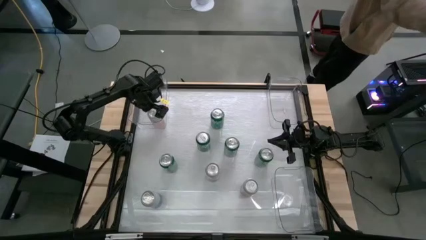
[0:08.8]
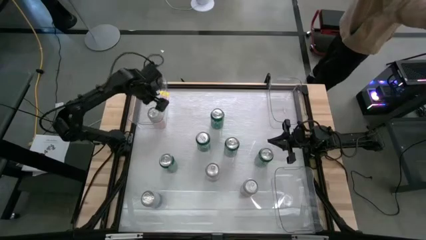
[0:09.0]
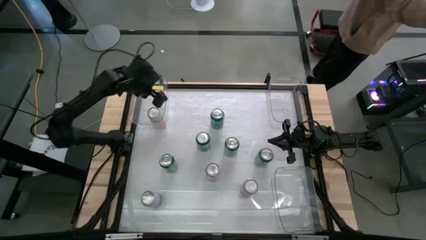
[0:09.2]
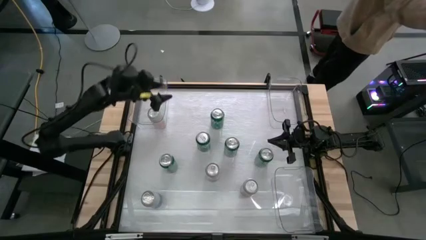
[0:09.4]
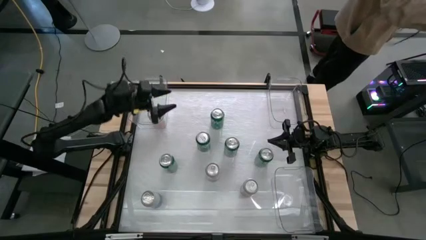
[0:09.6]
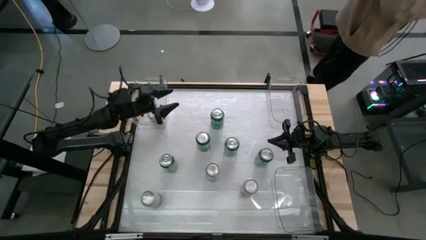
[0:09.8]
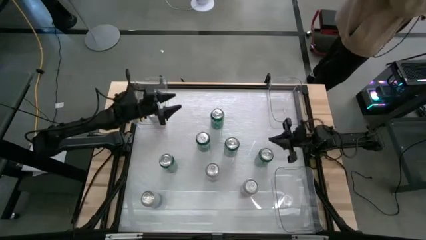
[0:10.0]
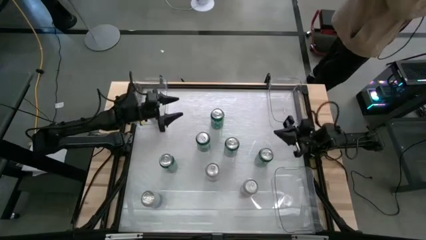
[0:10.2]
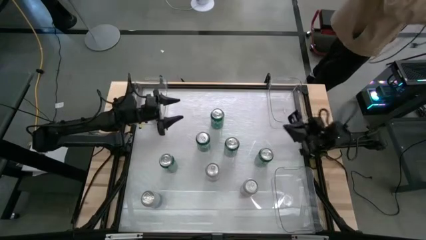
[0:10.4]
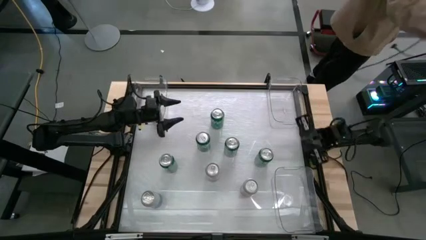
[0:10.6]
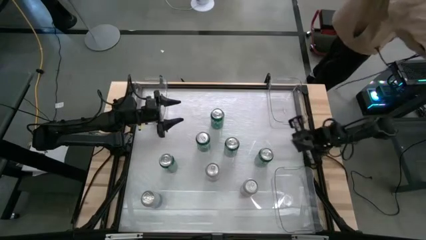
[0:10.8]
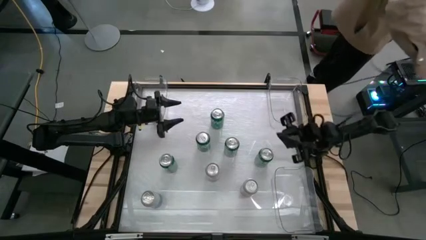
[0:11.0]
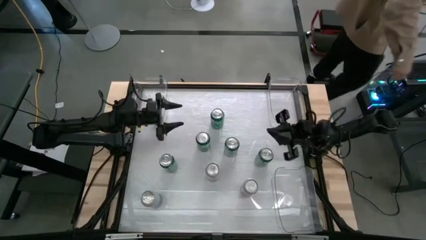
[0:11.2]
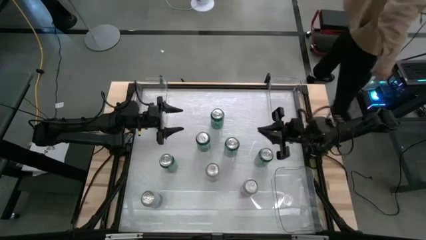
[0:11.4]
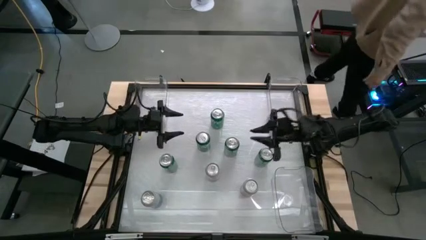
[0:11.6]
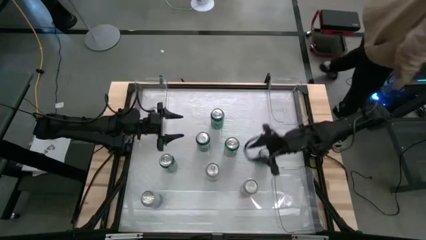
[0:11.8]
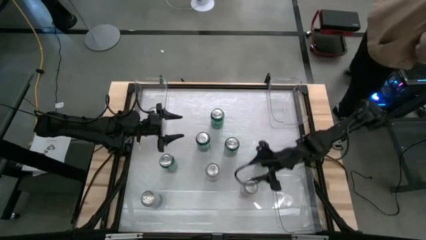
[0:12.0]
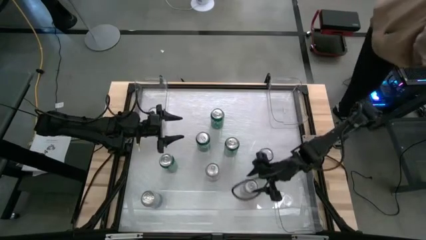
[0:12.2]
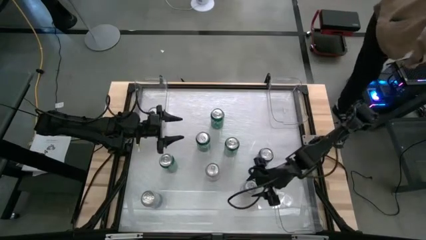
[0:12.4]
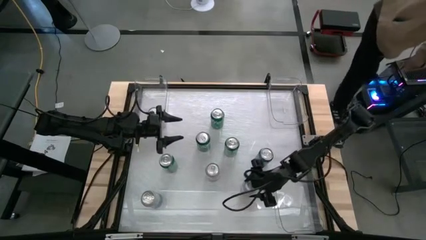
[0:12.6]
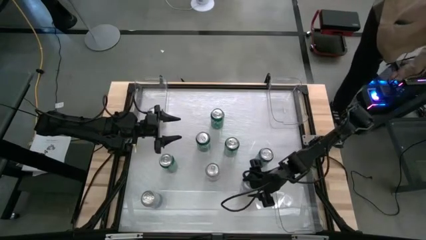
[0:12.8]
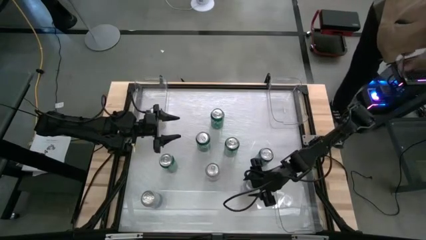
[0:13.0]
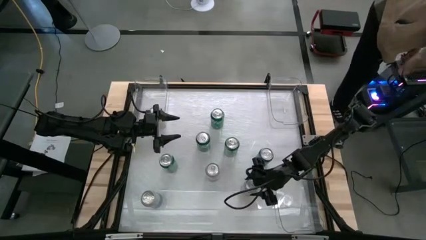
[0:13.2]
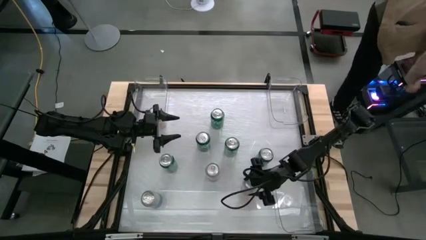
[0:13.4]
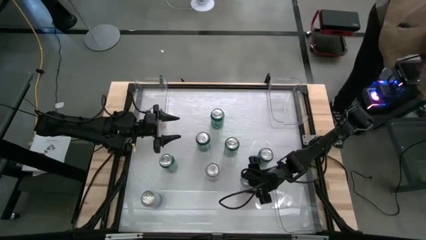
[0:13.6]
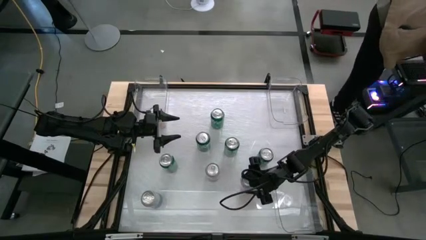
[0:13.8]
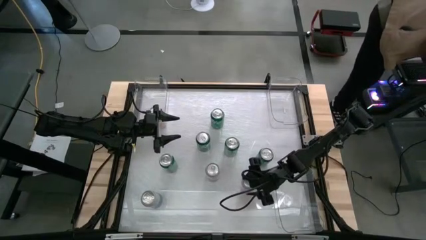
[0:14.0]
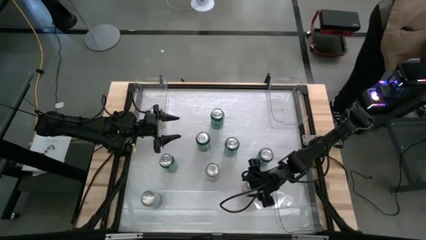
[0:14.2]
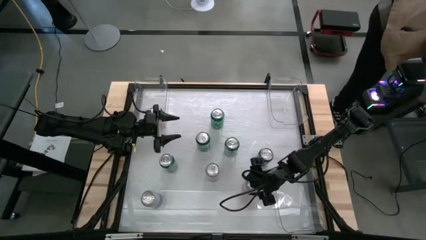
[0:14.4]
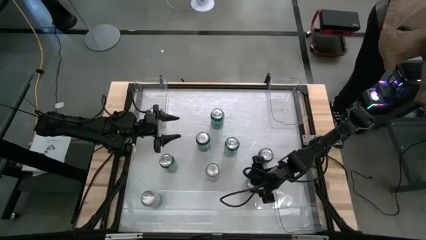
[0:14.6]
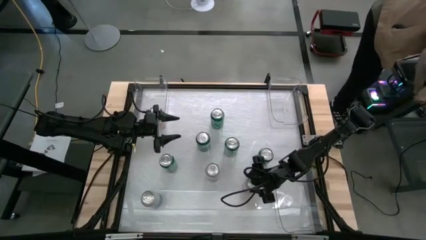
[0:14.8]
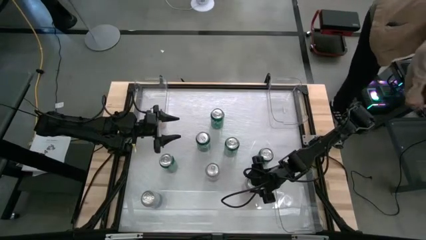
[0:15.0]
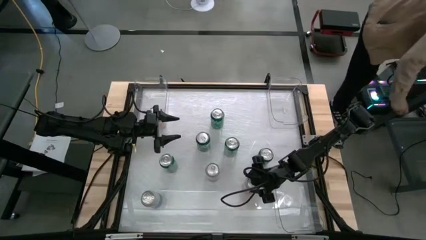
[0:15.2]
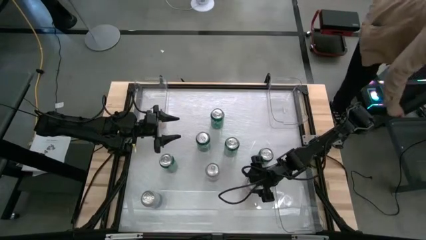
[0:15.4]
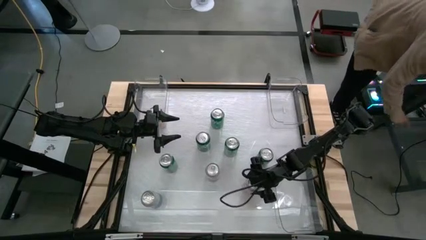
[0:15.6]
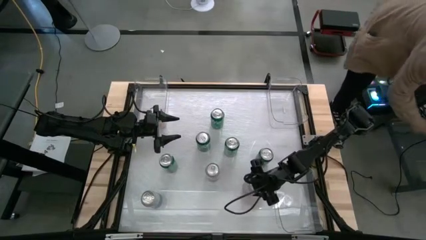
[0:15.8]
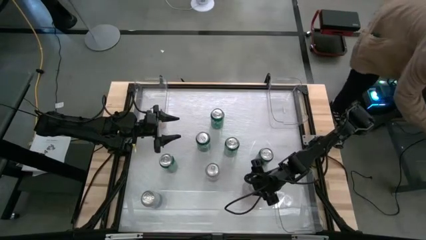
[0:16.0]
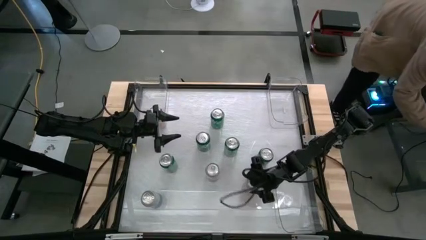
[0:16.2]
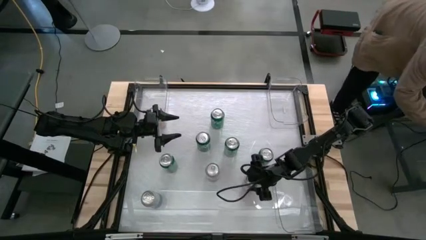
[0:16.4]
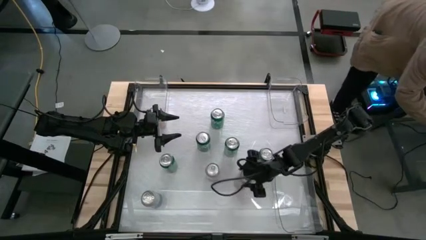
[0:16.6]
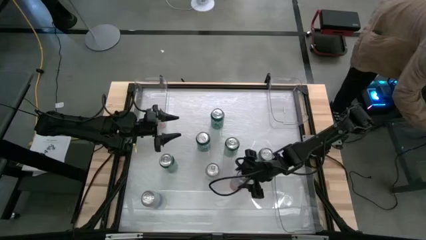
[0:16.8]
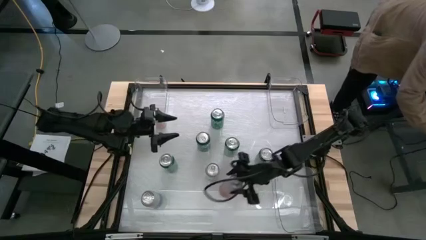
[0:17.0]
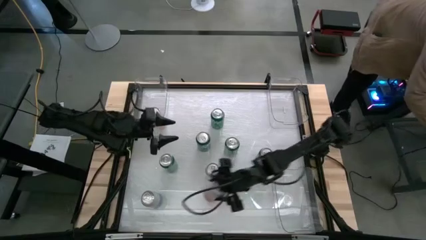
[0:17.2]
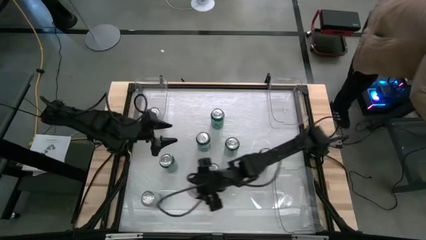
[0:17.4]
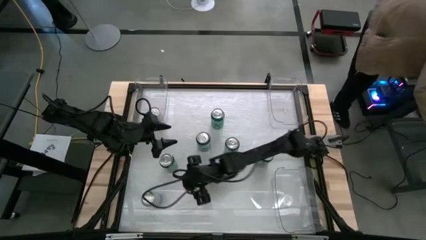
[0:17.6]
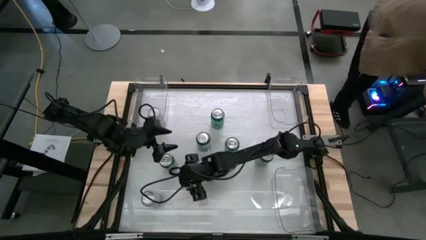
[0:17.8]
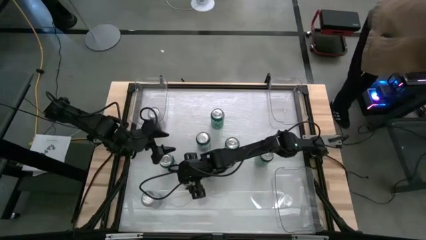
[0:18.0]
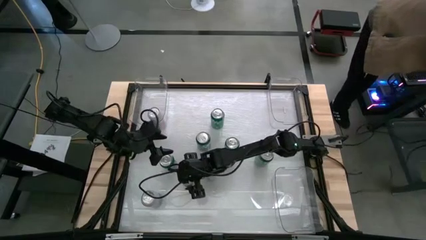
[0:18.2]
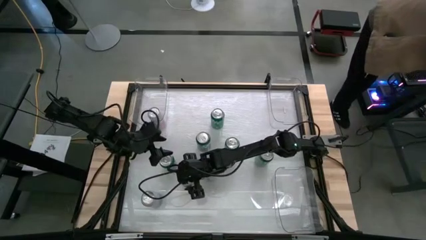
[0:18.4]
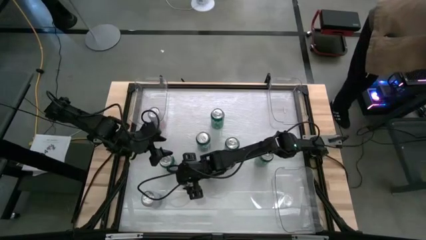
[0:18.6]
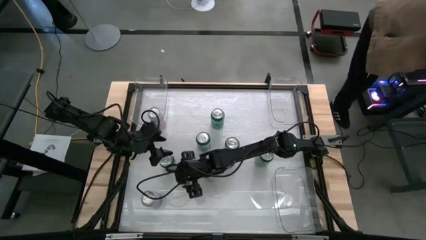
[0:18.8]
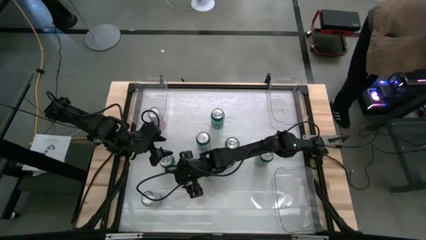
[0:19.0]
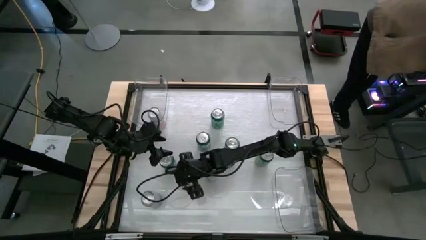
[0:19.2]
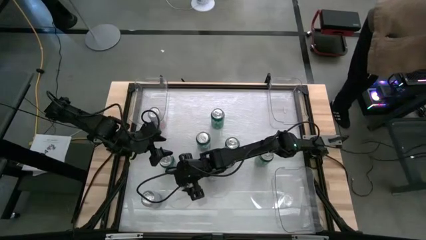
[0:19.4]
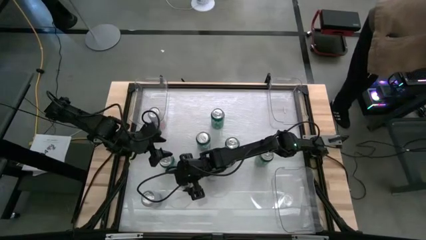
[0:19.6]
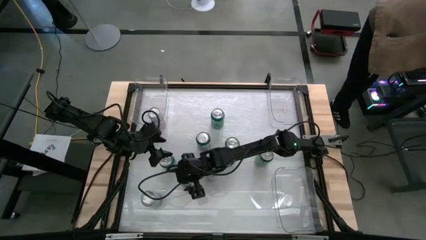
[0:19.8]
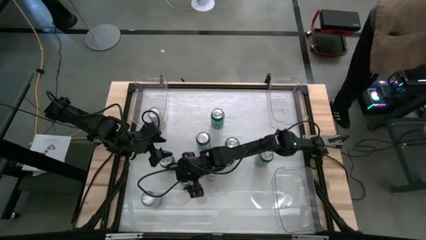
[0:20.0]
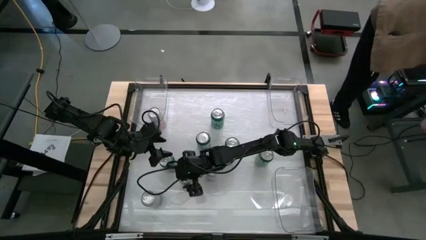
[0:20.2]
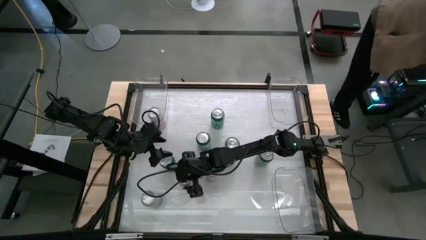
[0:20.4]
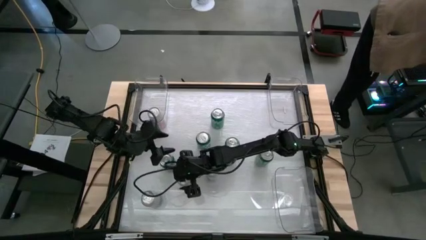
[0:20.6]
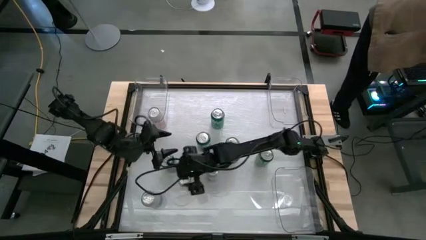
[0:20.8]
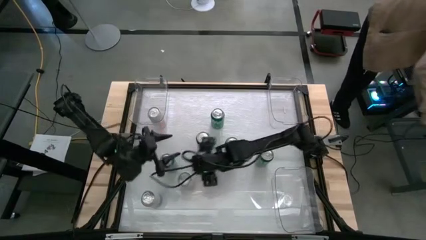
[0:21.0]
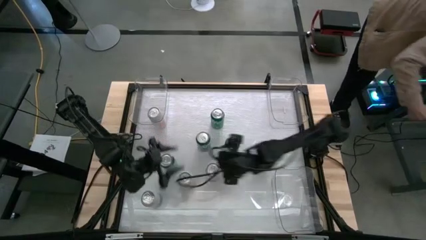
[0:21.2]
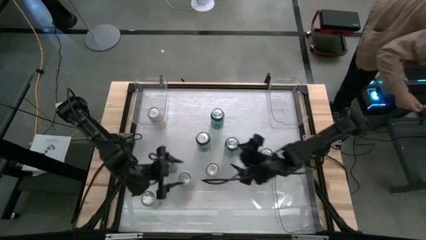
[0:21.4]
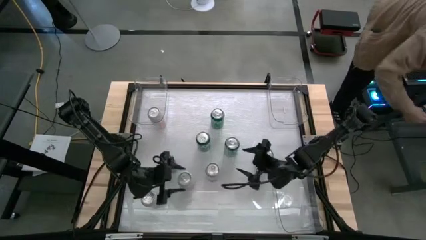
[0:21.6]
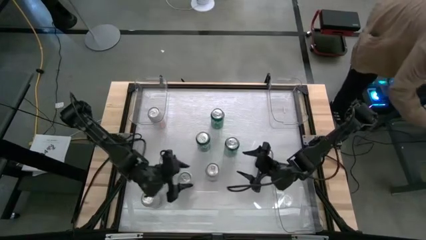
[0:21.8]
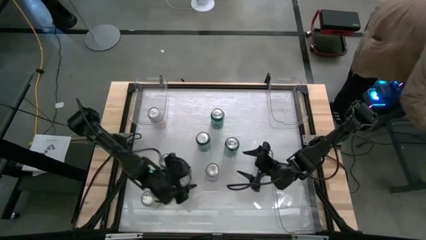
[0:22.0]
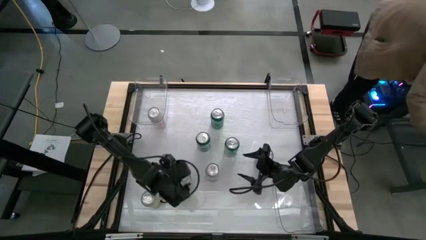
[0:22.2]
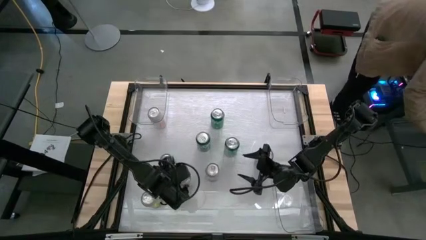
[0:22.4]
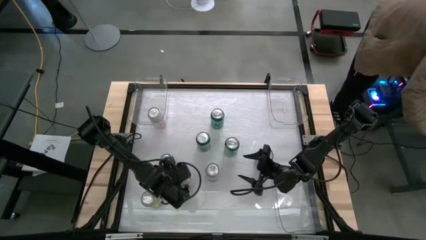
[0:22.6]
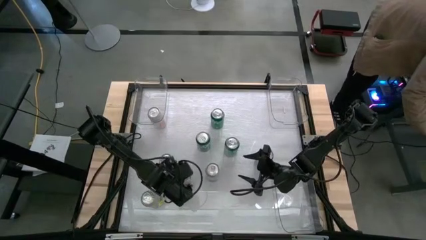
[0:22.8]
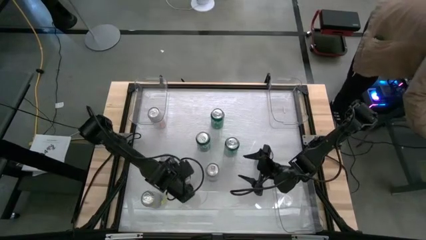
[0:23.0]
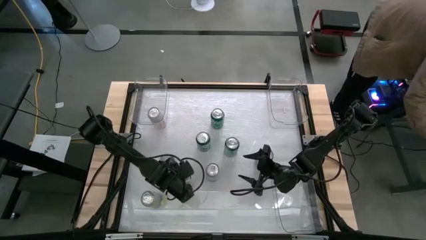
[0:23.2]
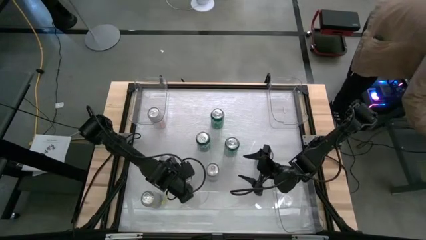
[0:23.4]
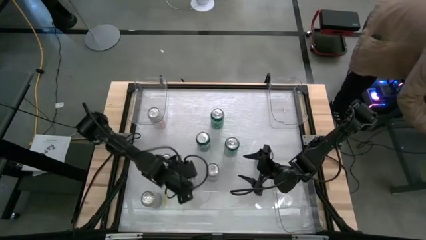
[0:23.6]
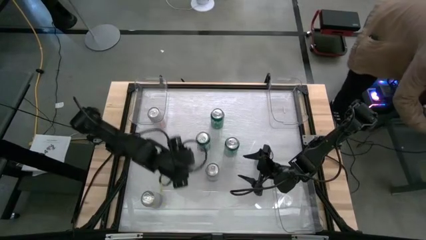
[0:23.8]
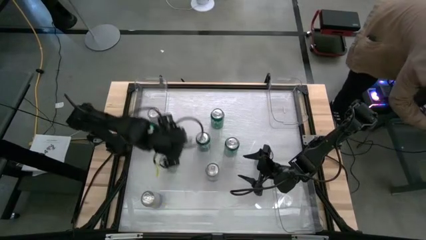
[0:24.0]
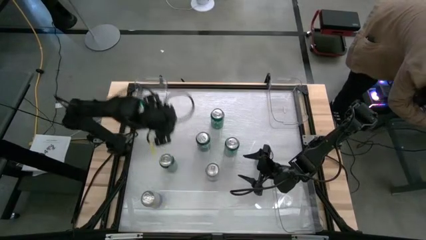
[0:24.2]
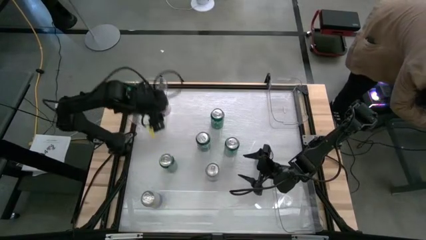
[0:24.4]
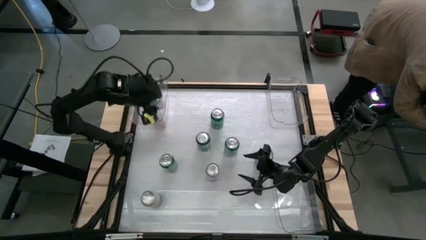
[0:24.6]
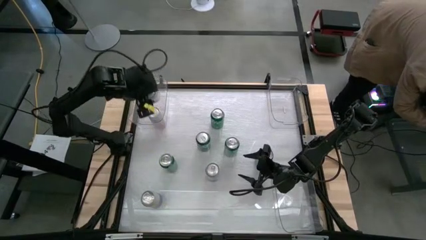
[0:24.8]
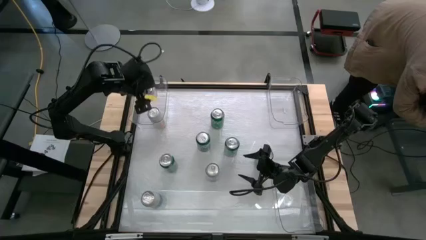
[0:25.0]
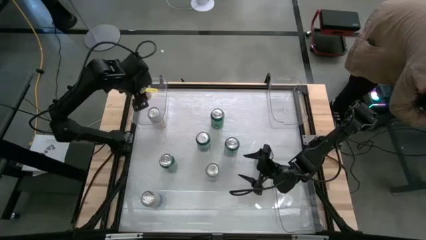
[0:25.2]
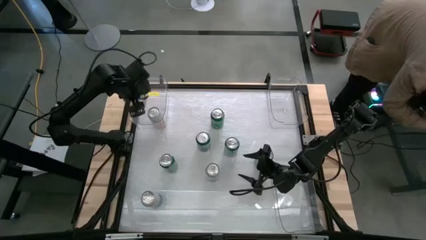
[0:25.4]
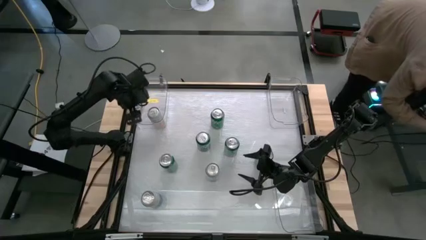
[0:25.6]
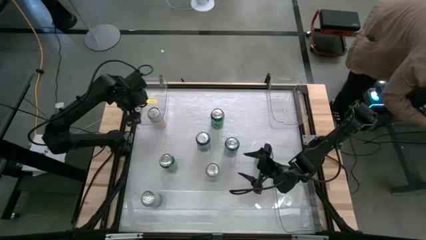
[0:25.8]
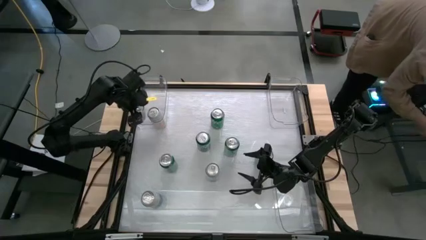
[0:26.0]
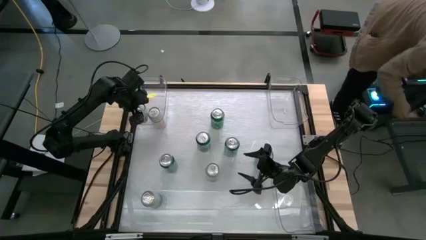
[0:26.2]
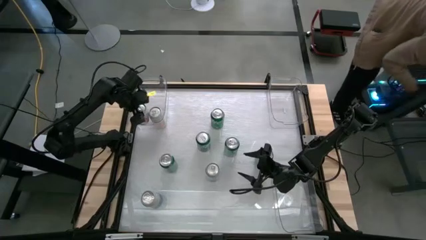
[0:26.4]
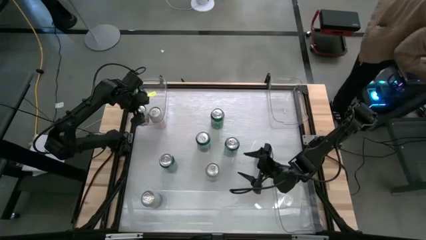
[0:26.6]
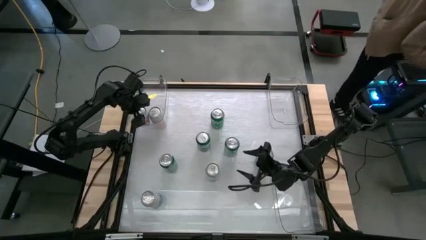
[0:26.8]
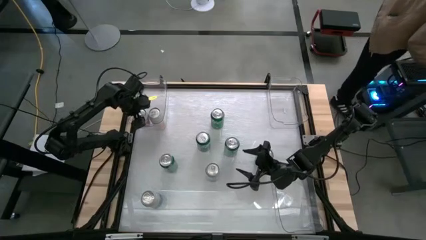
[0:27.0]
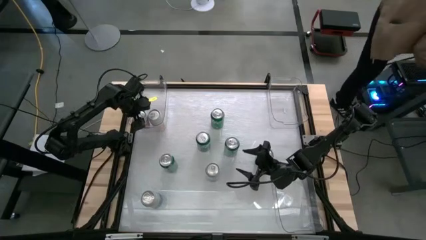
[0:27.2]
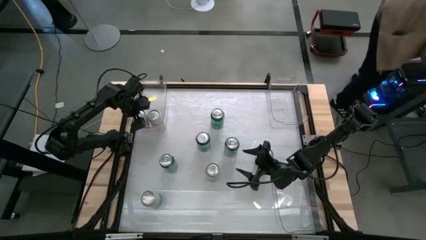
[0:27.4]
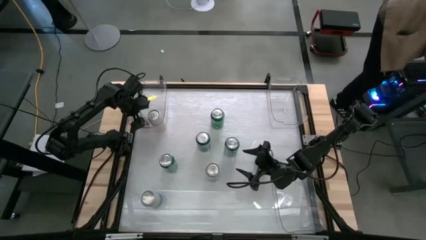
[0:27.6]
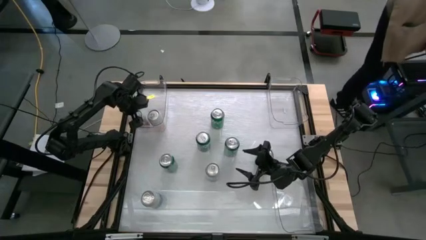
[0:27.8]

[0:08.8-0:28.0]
Task: Sort soda cans
Put the orange/white soda can into the left transparent bin
